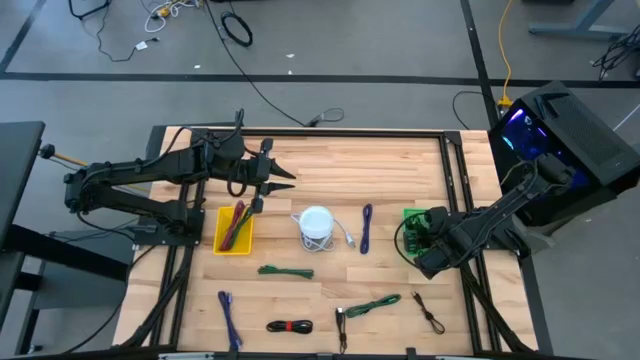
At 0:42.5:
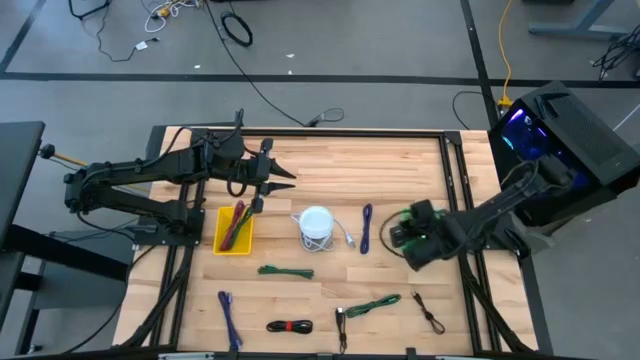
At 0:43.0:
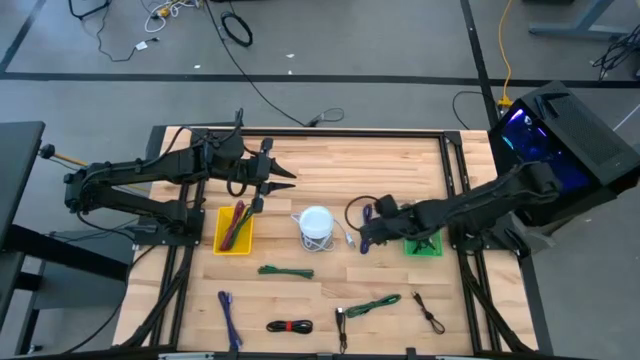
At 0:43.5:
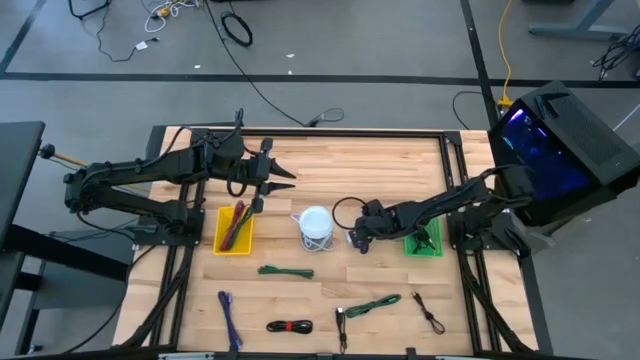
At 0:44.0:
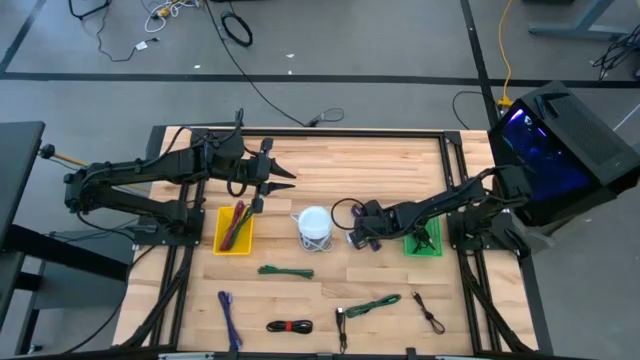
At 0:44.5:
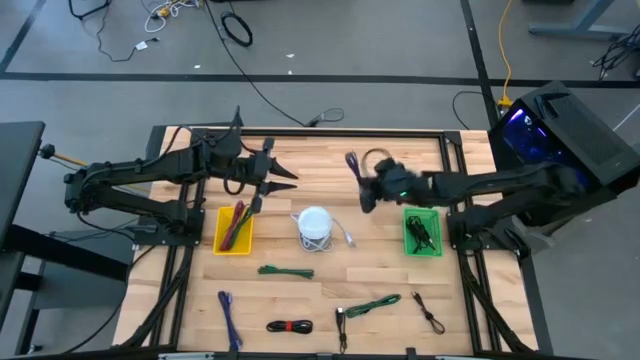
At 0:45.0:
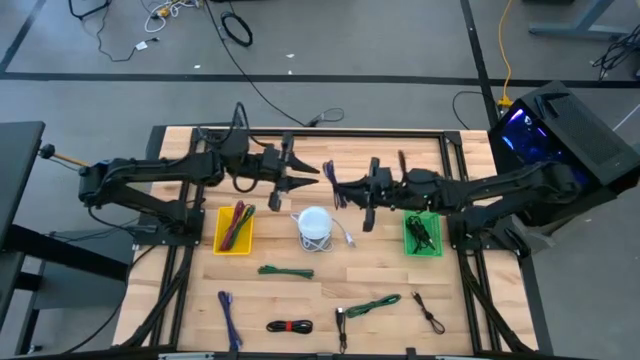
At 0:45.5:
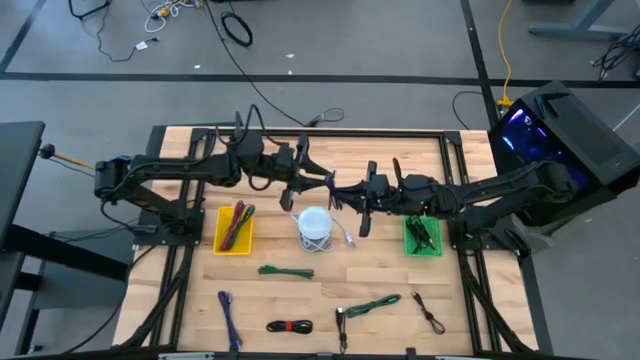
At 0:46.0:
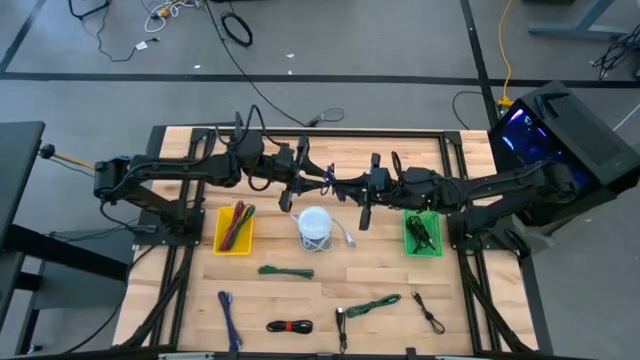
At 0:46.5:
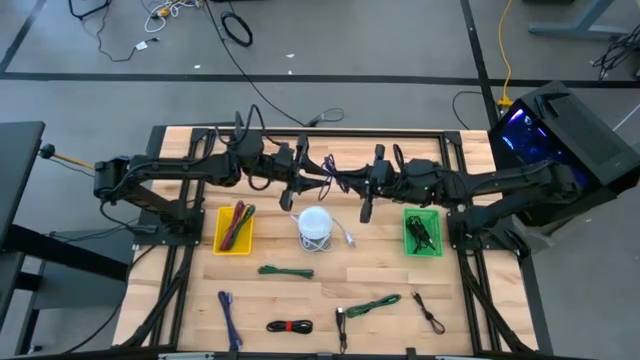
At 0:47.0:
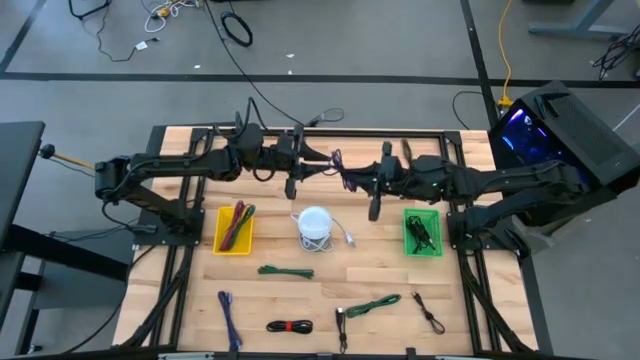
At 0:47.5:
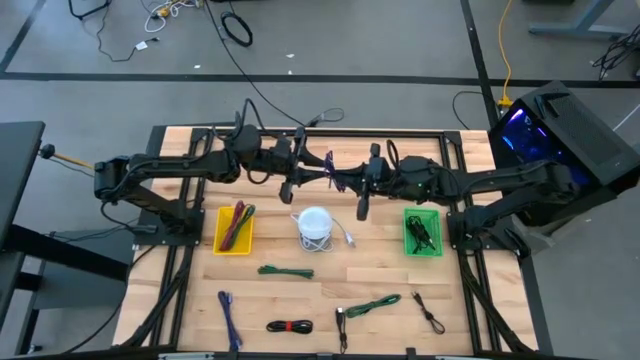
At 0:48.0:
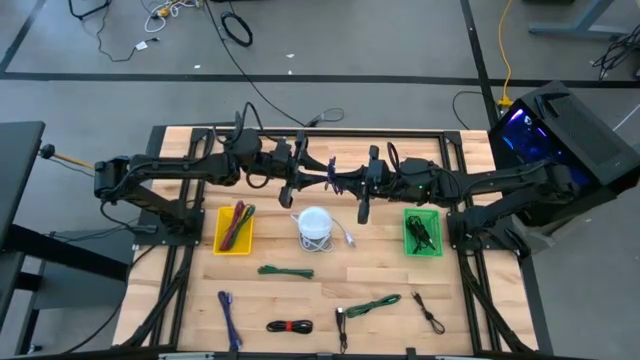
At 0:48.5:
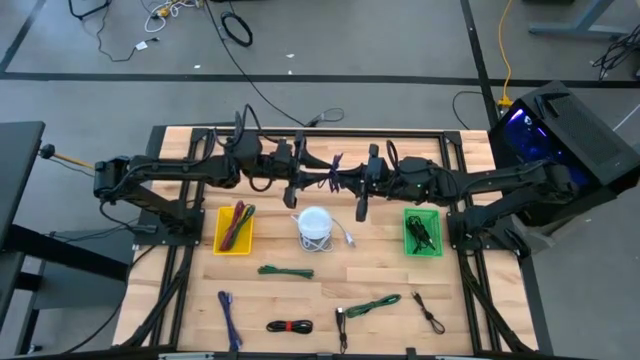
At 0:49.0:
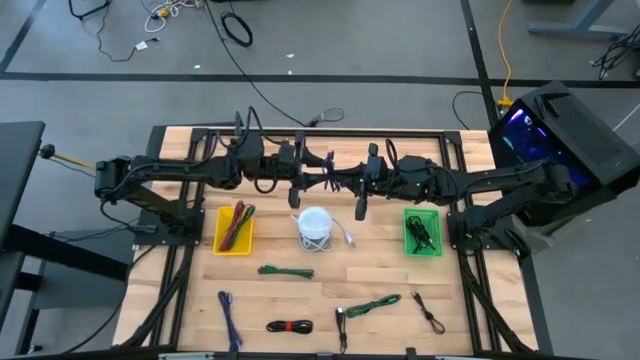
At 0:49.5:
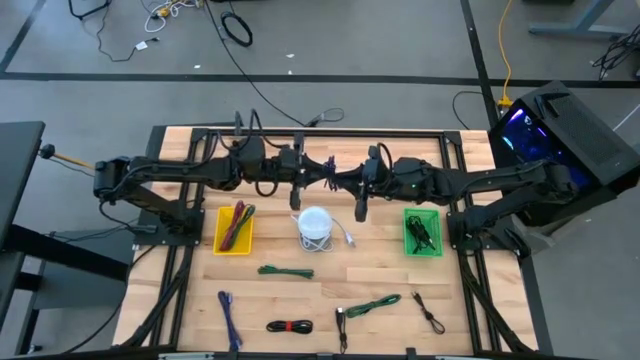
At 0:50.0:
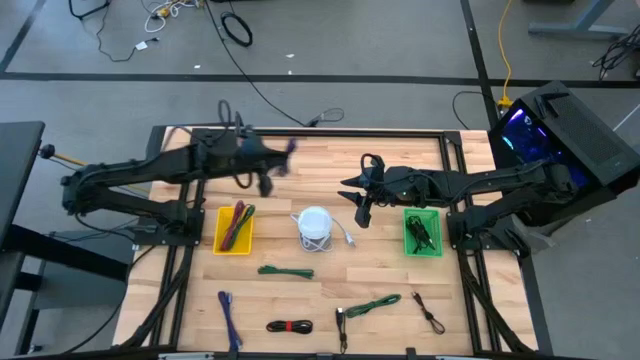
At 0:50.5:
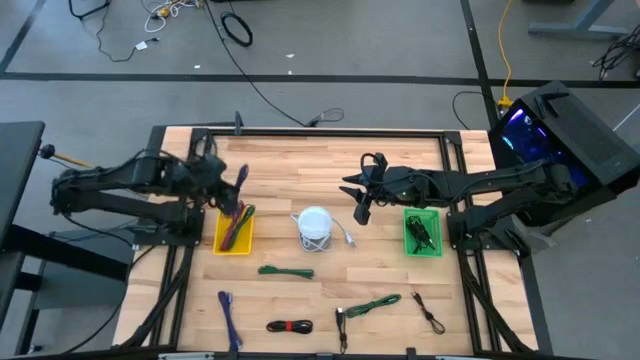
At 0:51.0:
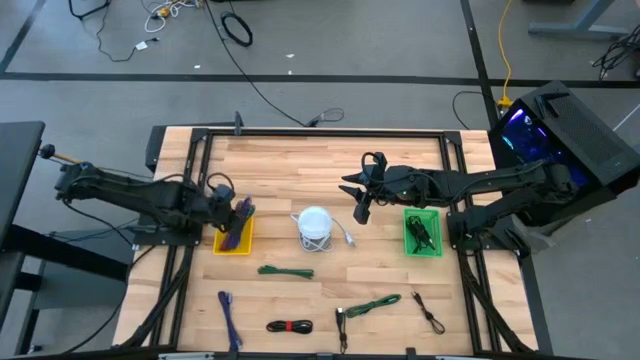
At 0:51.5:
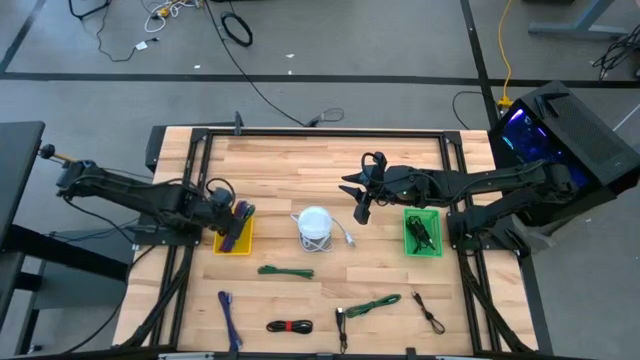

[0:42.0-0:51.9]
Task: Pick & Place USB Port
Put the purple charger cable into the yellow bin

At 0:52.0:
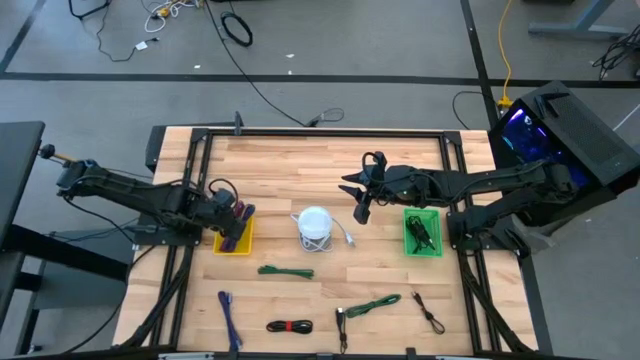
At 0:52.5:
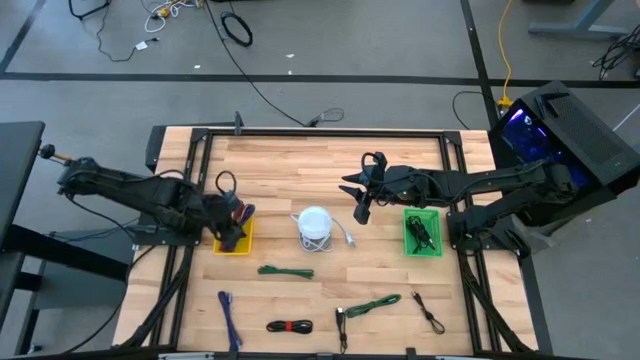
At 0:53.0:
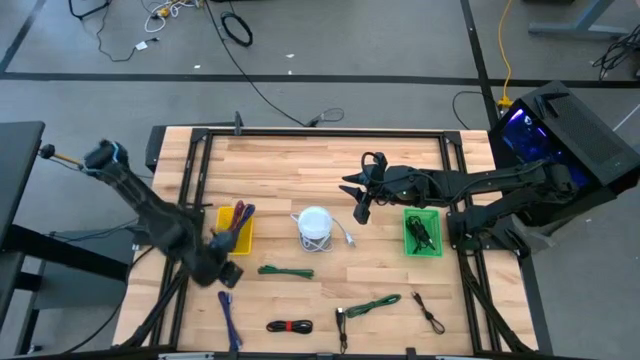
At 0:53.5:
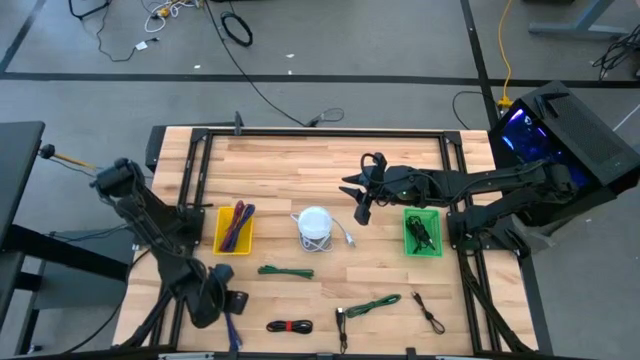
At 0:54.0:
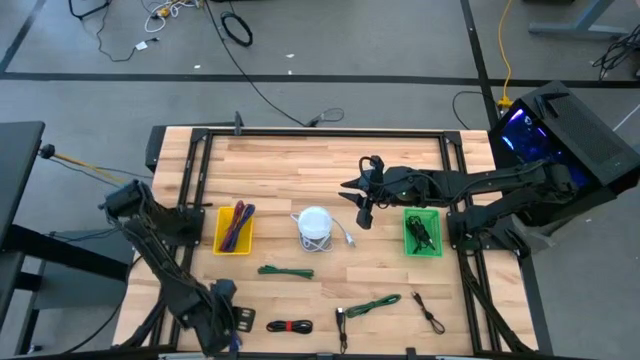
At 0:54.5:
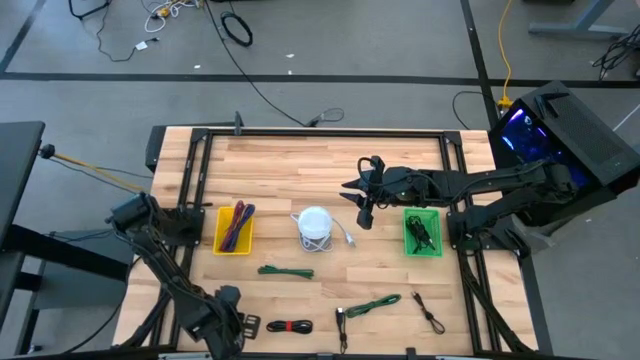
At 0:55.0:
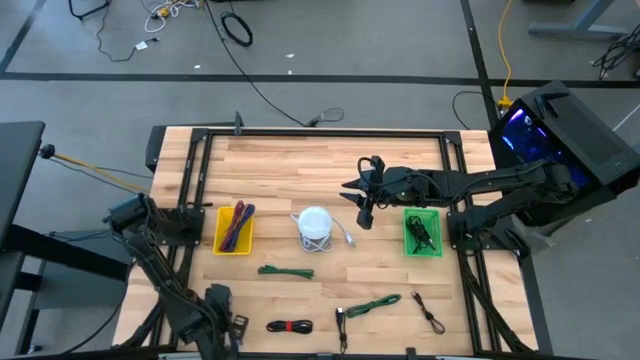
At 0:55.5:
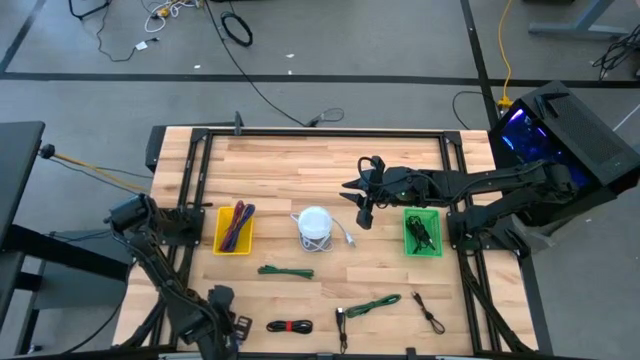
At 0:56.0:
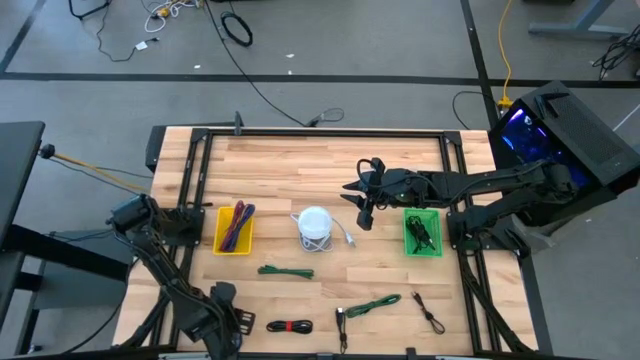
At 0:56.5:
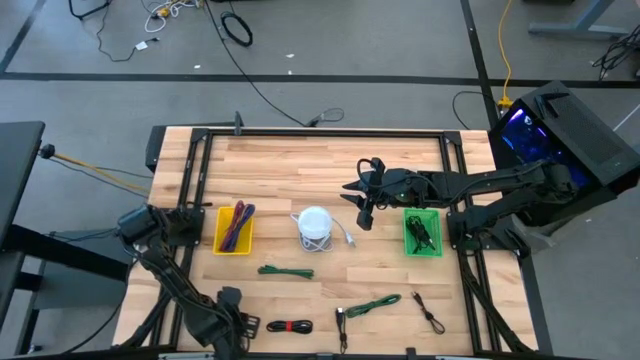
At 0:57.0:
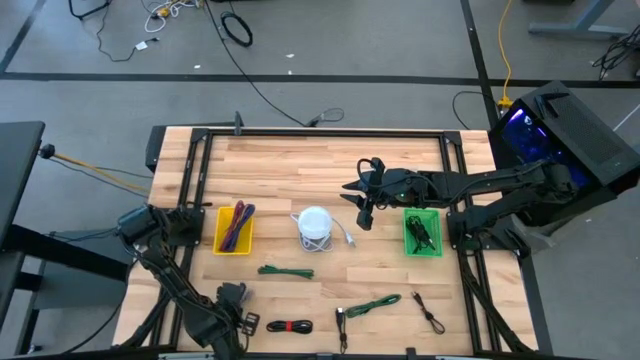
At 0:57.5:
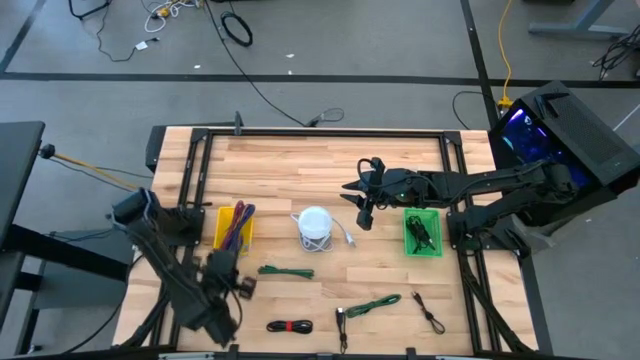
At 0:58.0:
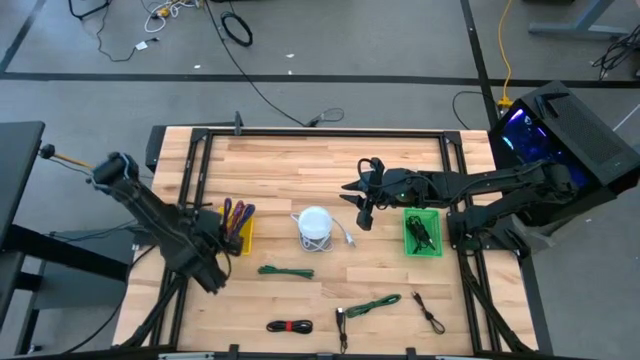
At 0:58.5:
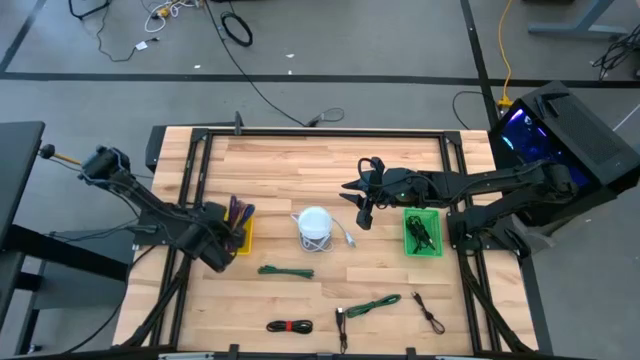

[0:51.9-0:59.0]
Put the purple charger cable into the yellow bin

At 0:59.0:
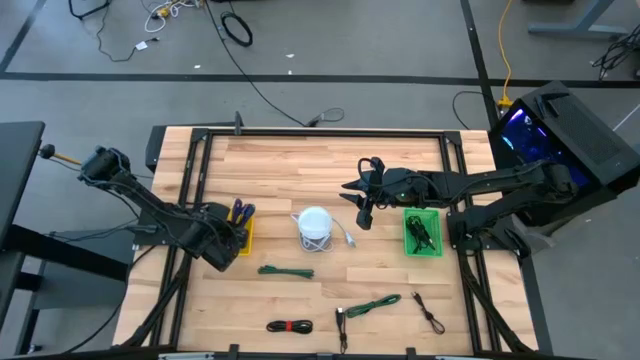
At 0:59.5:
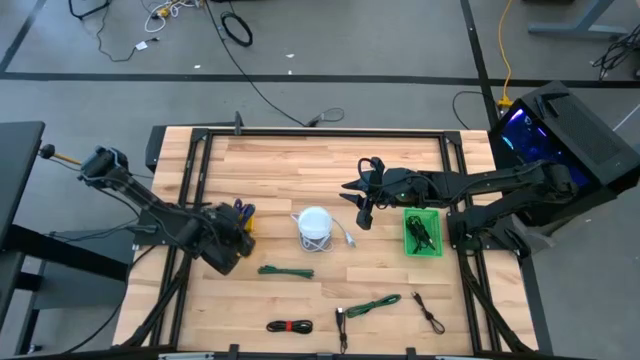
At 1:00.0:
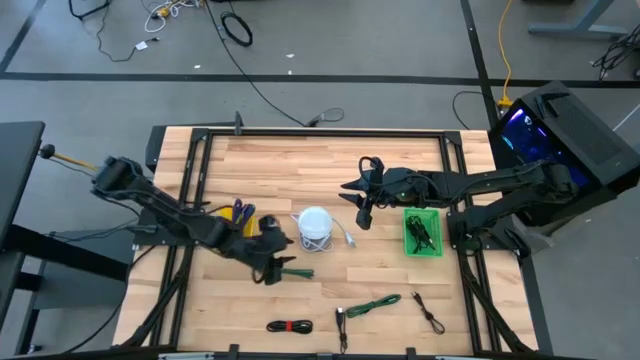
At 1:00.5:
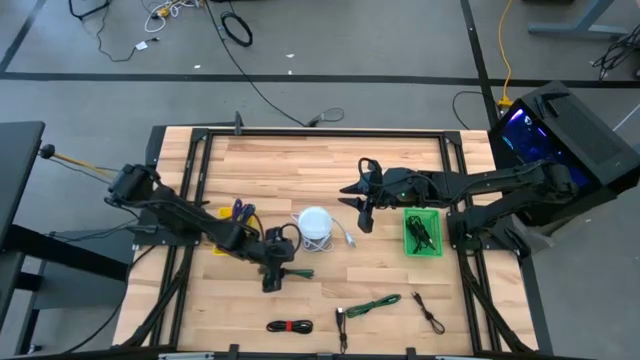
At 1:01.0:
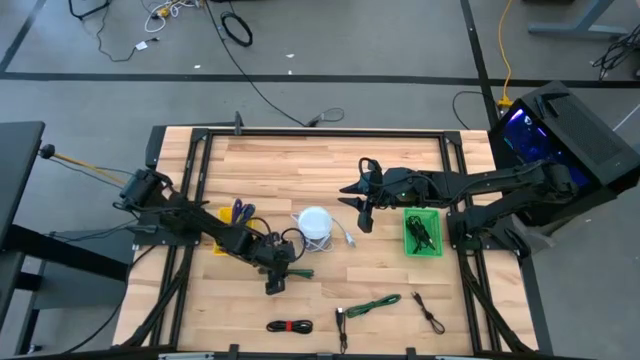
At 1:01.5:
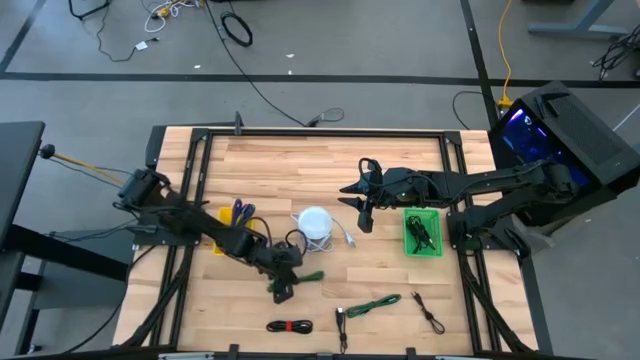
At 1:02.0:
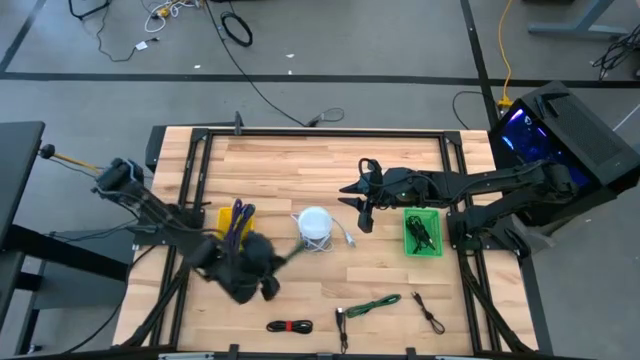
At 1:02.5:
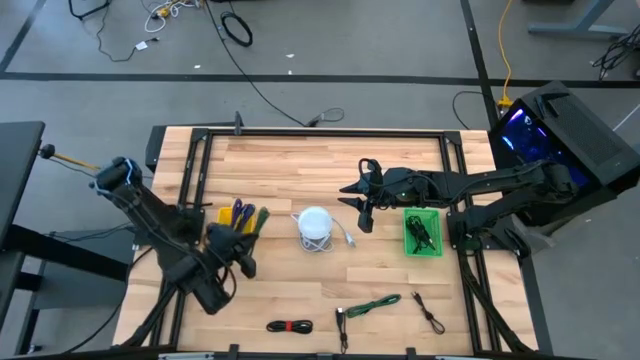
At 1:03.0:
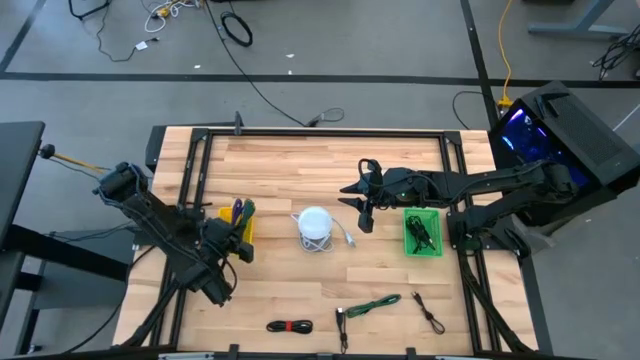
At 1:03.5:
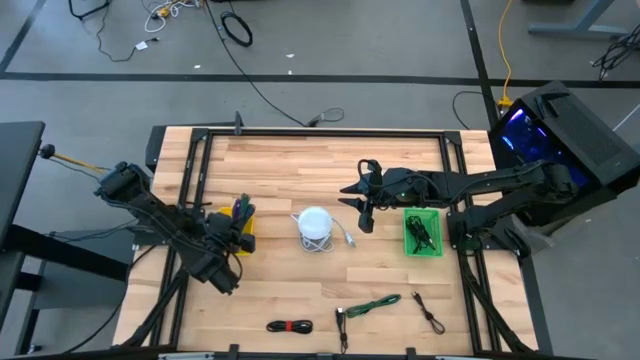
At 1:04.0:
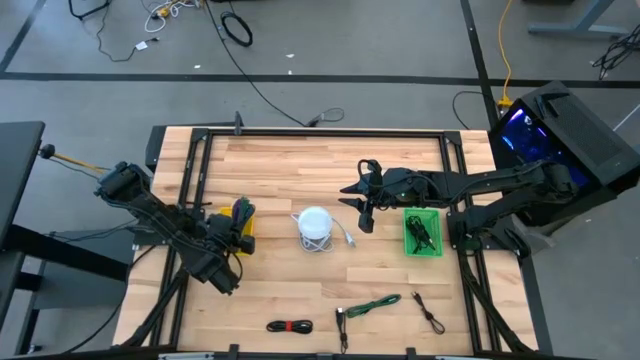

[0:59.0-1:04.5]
Put the green charger cable into the yellow bin
